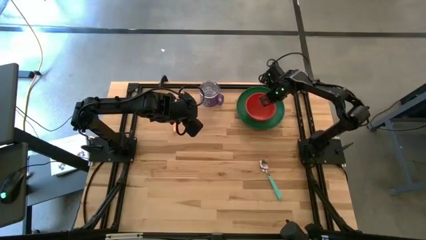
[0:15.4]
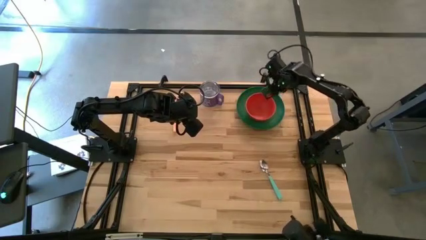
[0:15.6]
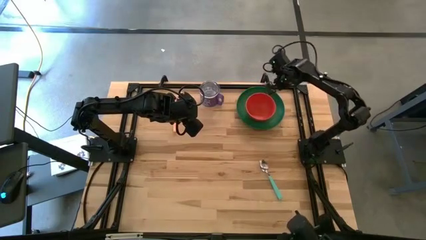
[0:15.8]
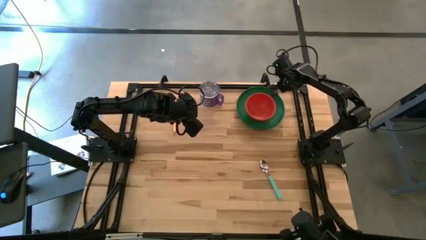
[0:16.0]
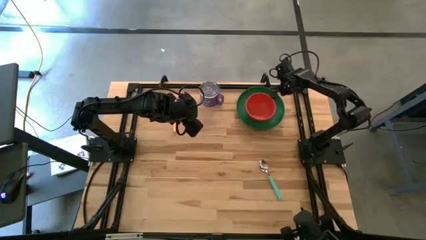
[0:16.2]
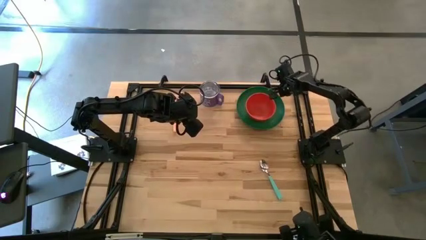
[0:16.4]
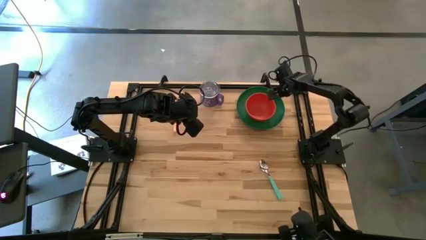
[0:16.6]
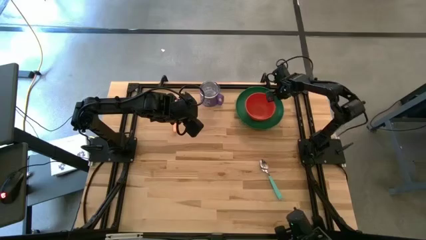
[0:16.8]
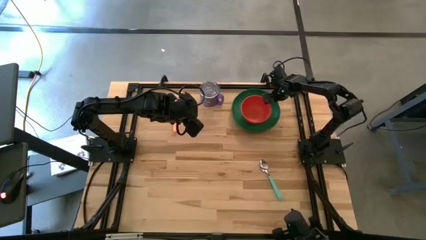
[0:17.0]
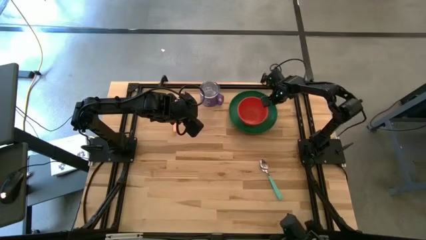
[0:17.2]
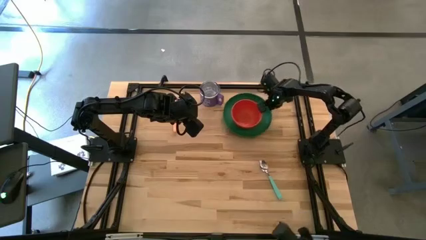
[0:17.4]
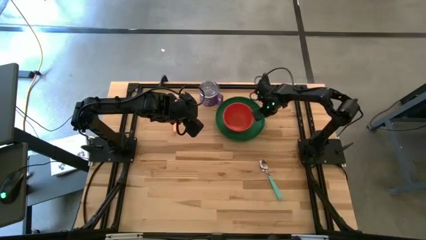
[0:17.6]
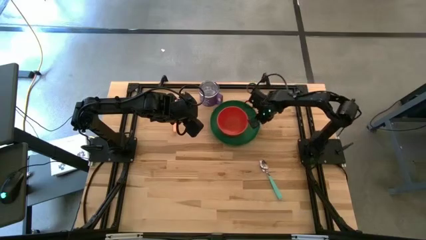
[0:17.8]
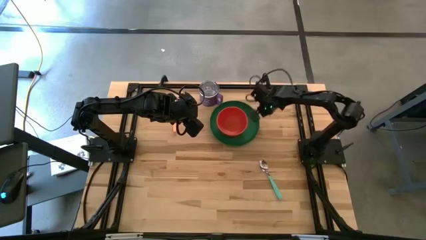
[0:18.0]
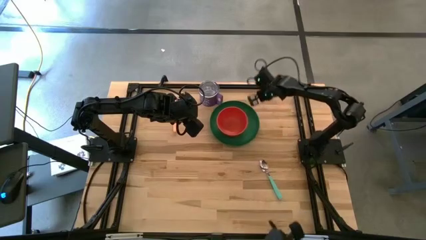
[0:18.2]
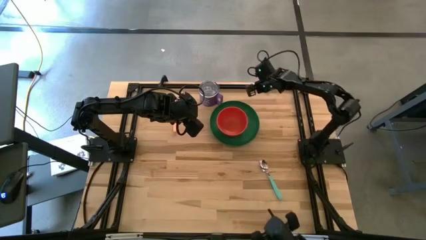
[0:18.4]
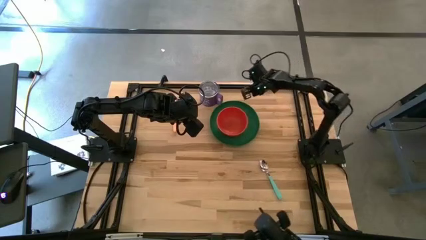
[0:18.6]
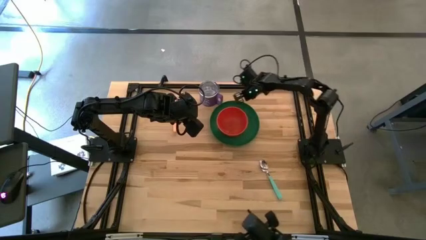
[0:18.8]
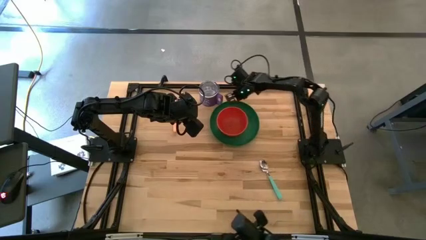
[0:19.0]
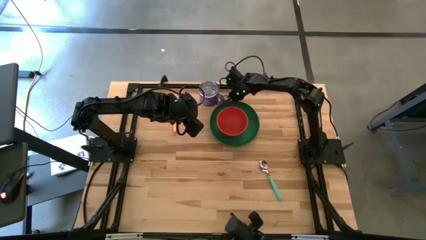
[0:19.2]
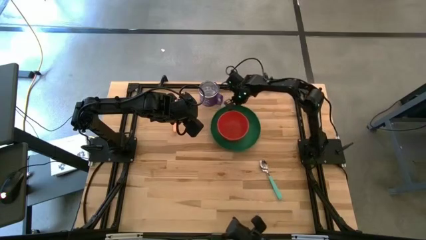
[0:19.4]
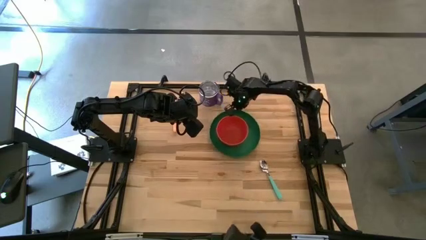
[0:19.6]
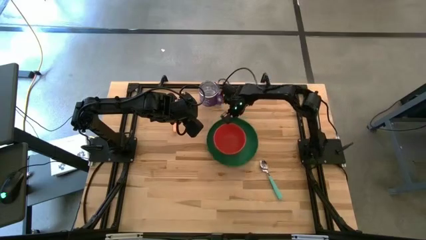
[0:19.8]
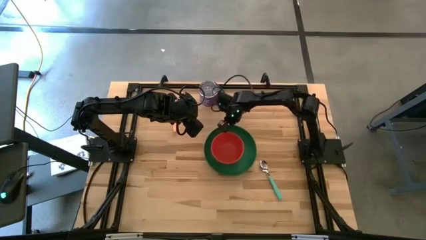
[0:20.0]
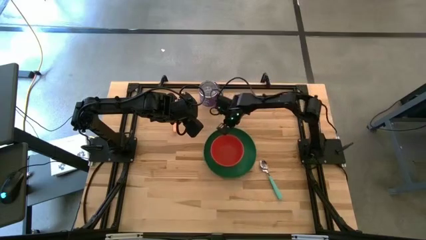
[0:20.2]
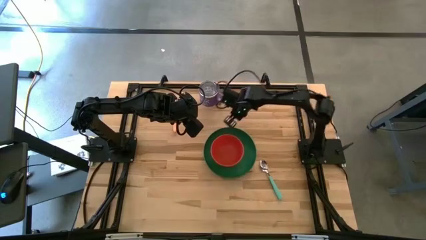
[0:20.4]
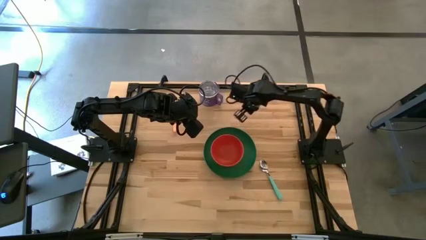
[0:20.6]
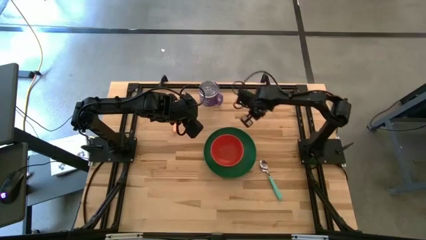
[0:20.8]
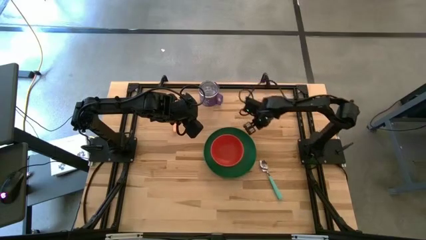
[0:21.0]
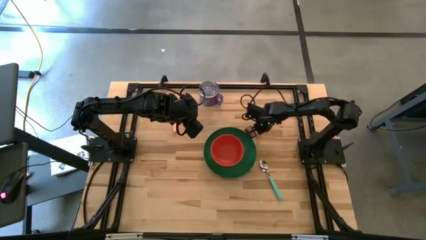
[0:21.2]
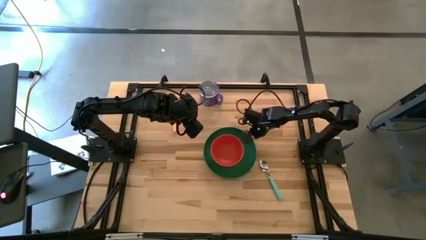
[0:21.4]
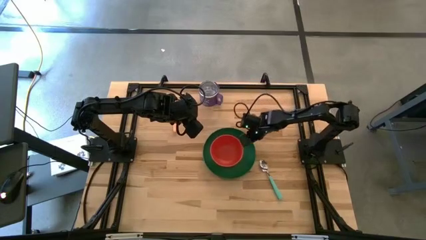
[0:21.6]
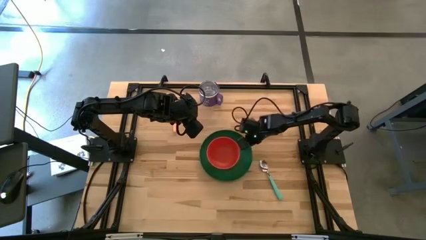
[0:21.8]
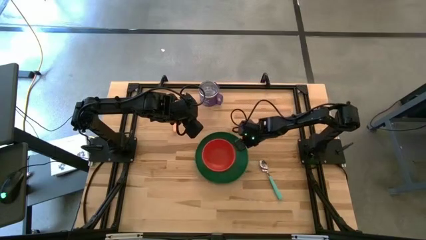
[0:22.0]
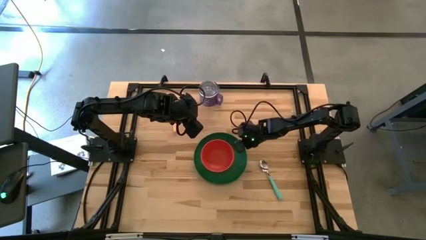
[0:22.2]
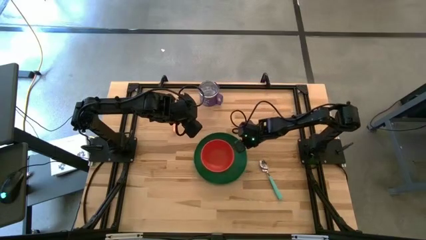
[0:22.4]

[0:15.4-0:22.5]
Task: Set table place
Move the green plate with orange bowl on top to the center of the table

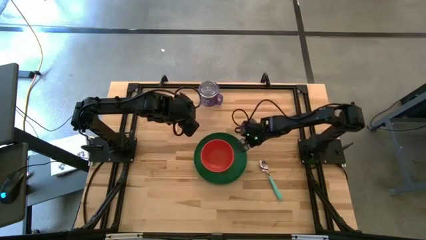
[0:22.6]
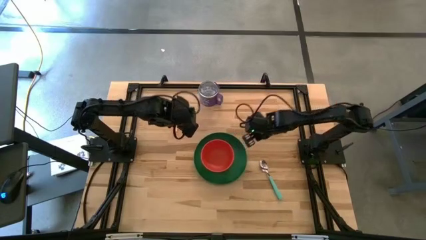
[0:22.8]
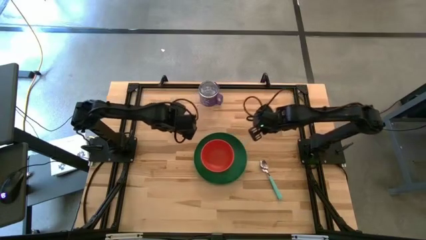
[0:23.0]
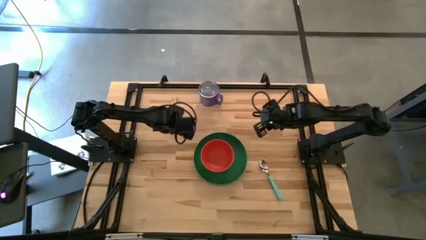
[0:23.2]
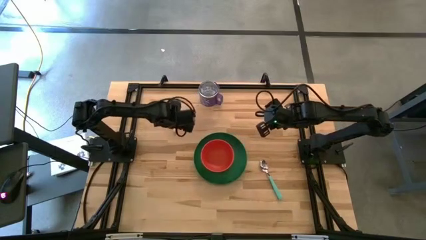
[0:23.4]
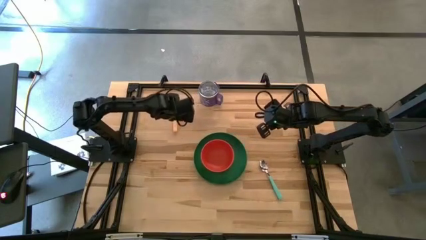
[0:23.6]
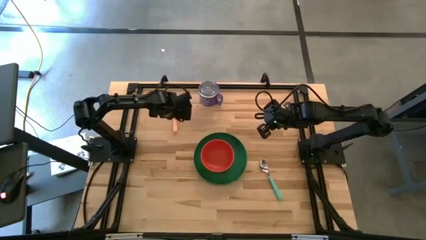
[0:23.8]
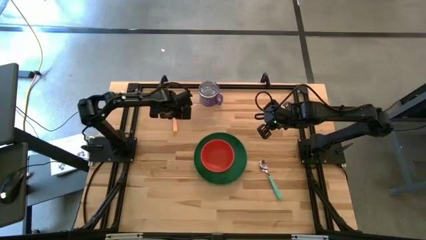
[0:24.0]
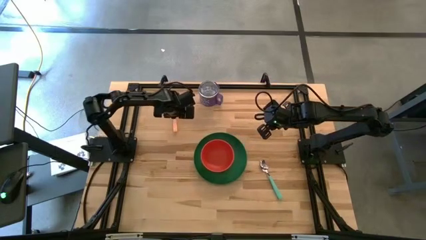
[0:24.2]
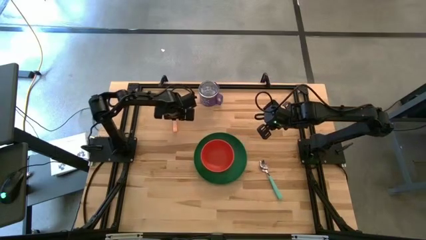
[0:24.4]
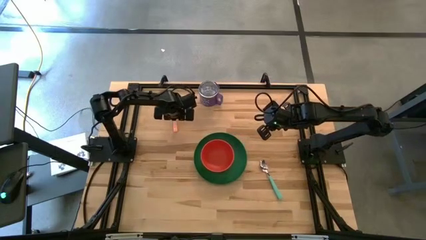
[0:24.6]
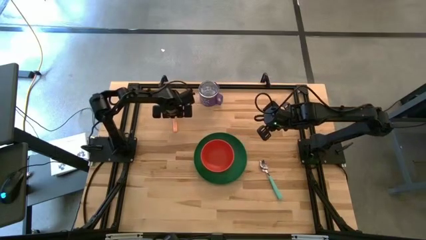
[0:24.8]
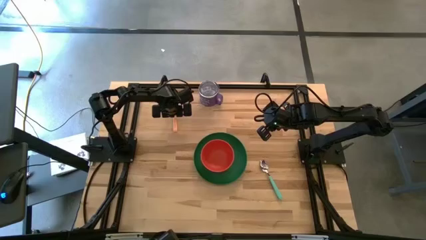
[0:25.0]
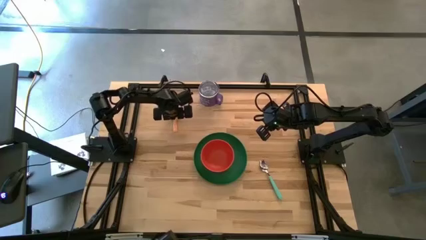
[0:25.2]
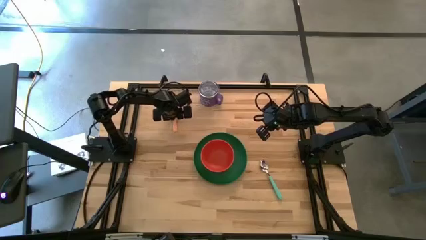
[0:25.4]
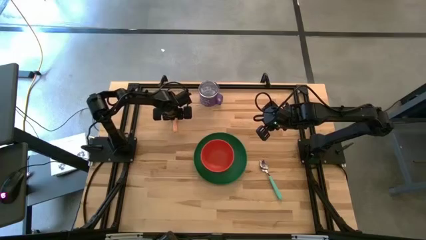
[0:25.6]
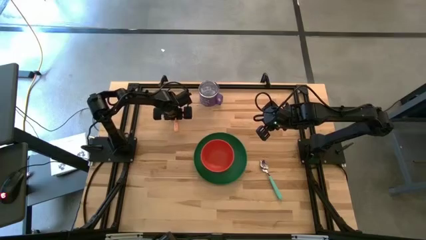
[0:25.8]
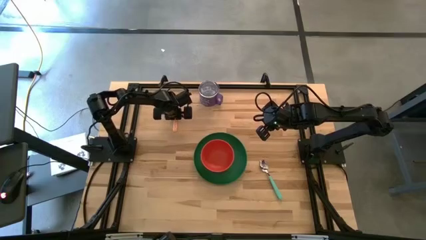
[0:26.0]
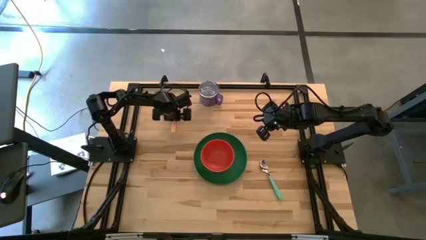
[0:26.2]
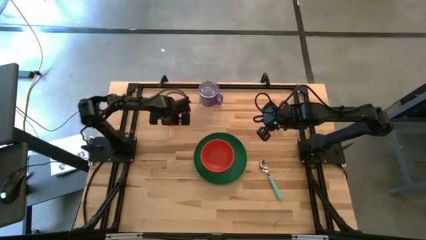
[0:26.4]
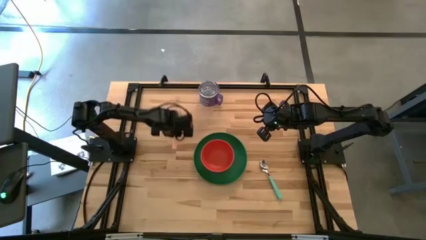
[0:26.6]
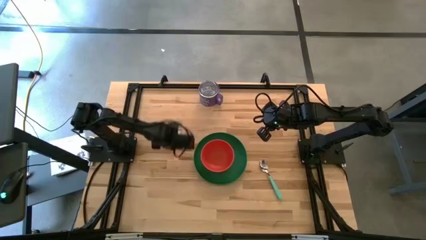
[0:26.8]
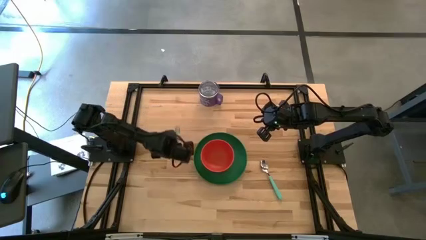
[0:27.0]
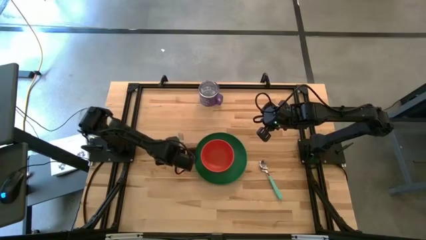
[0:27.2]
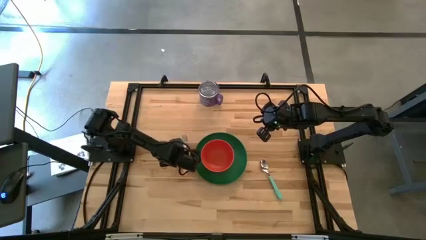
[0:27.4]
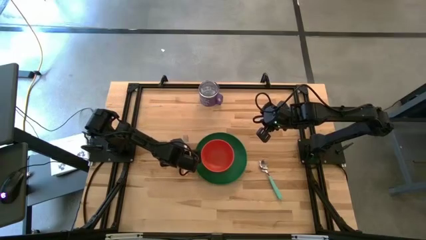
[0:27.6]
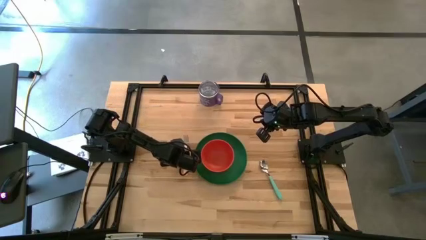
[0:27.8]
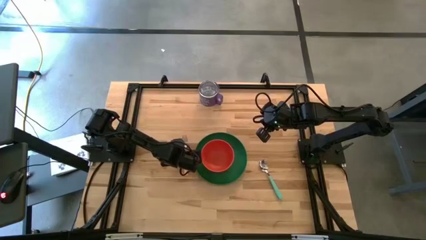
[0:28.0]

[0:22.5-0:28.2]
Move the light orange fork to the left of the green plate on the table

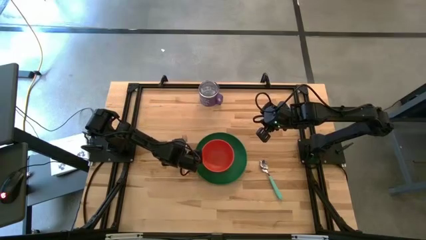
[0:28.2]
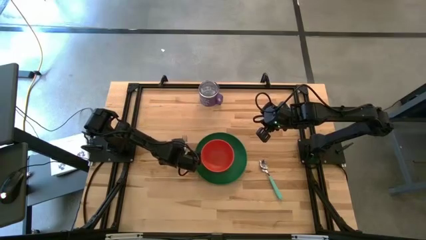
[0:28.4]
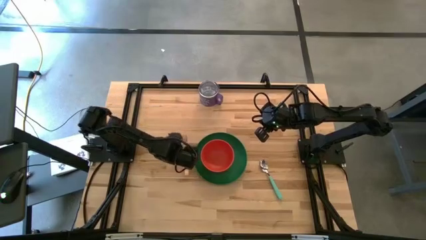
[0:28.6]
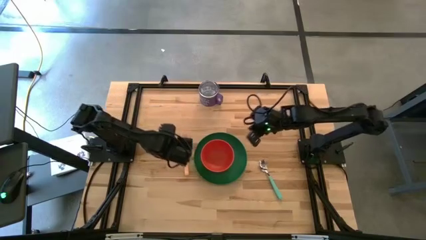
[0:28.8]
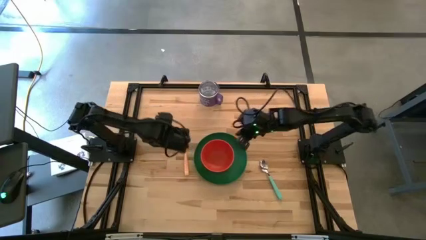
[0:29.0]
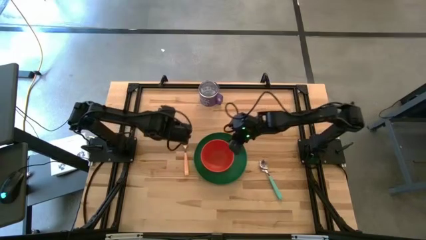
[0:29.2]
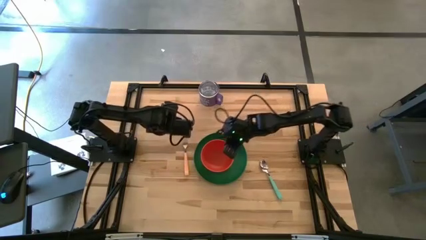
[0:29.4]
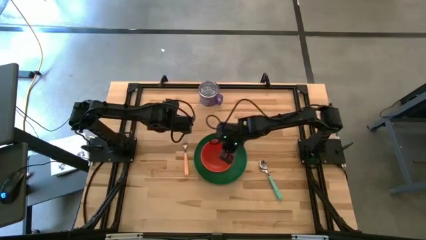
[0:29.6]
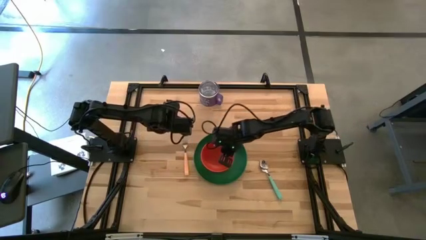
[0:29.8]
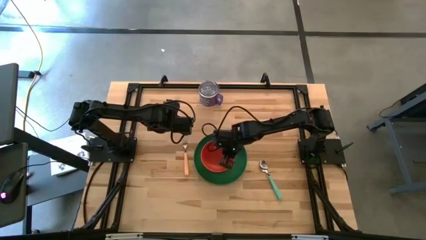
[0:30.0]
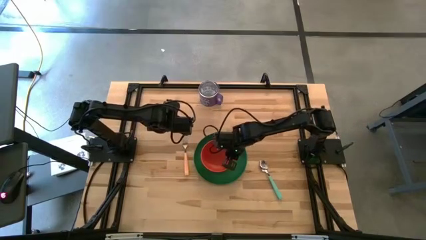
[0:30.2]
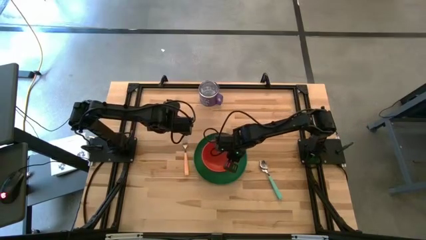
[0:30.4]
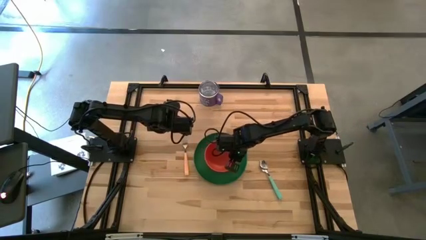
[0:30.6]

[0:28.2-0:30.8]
Adjust the orange bowl to the center of the green plate

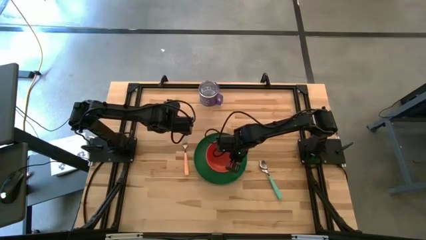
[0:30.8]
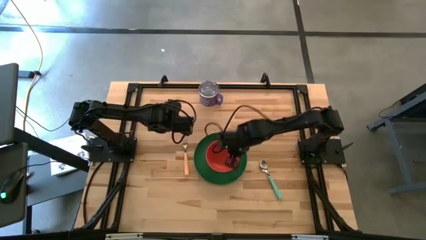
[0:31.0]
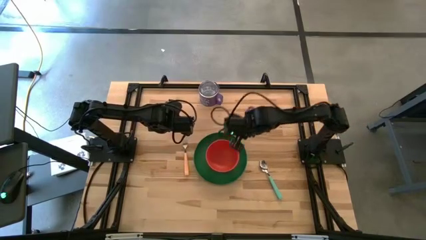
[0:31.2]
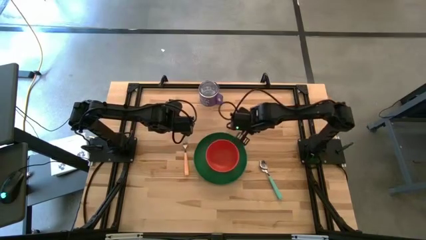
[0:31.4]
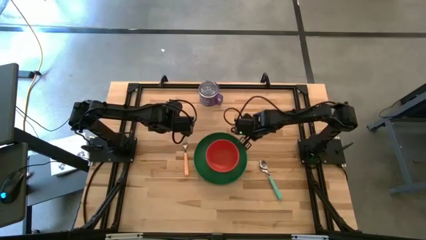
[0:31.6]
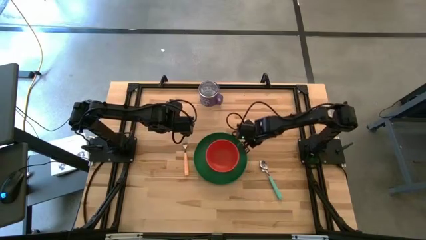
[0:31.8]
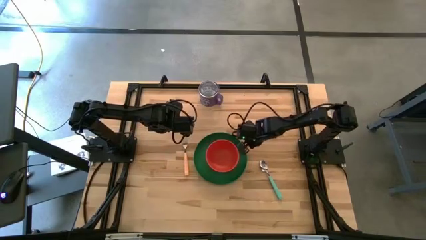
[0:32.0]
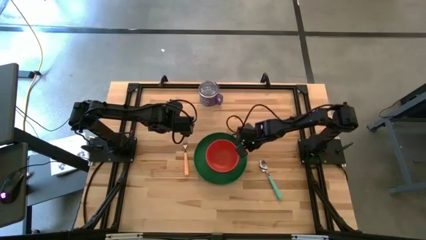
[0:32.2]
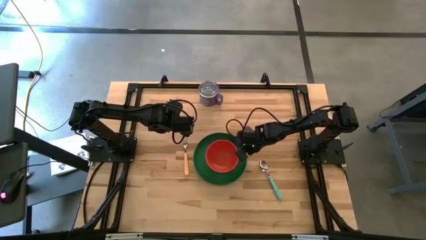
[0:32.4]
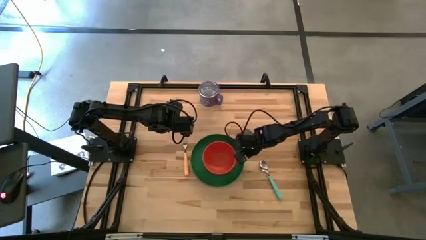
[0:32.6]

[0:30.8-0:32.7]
Adjust the green plate on the table
